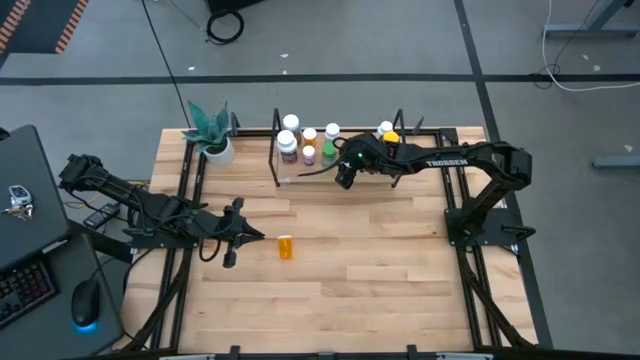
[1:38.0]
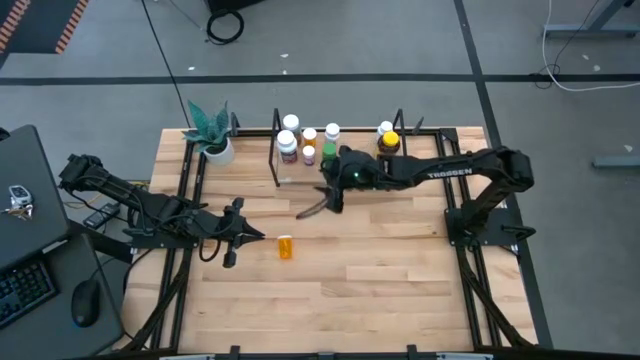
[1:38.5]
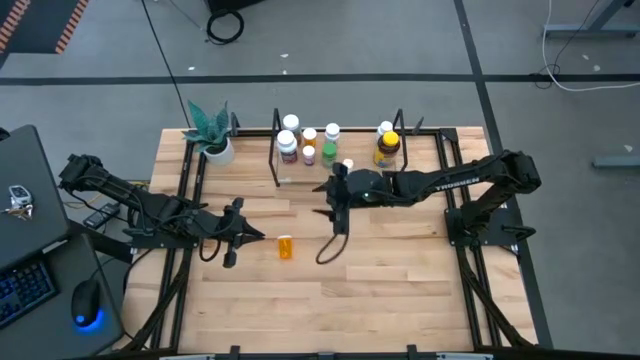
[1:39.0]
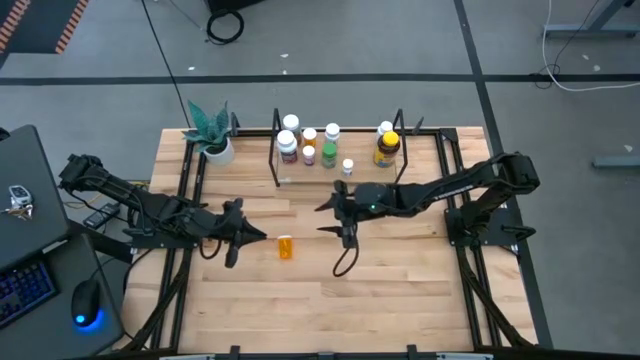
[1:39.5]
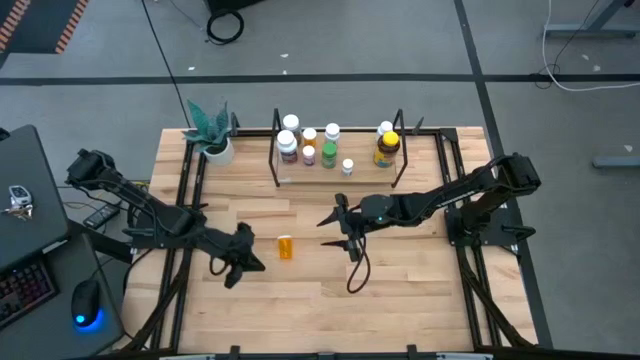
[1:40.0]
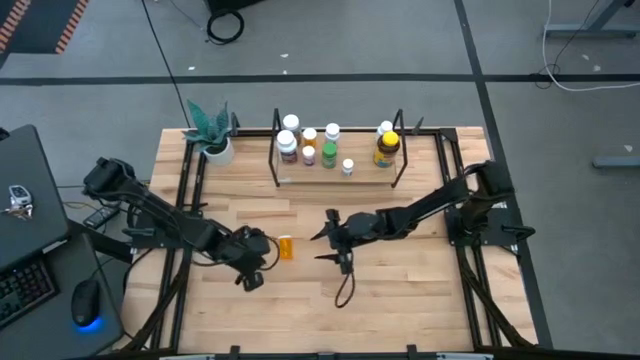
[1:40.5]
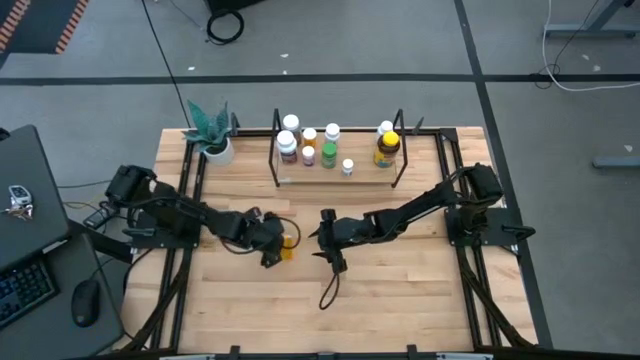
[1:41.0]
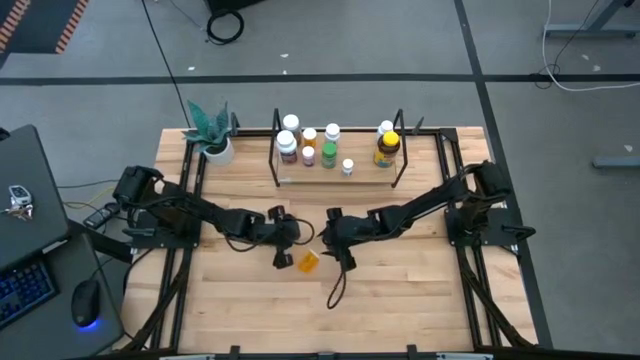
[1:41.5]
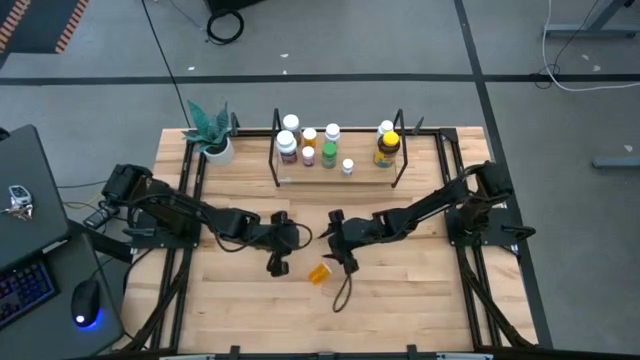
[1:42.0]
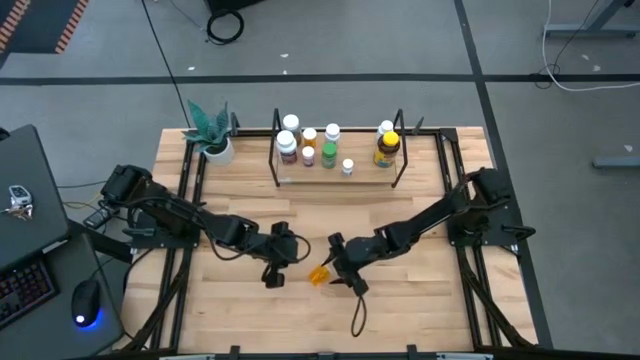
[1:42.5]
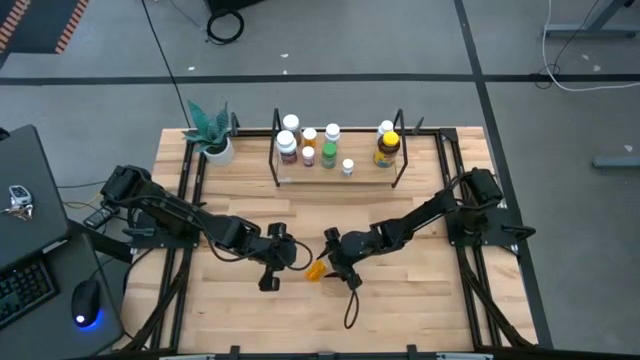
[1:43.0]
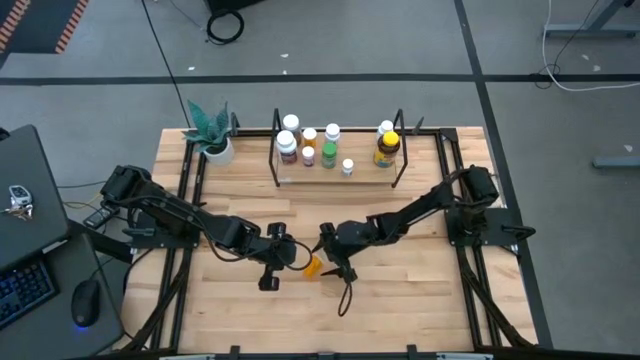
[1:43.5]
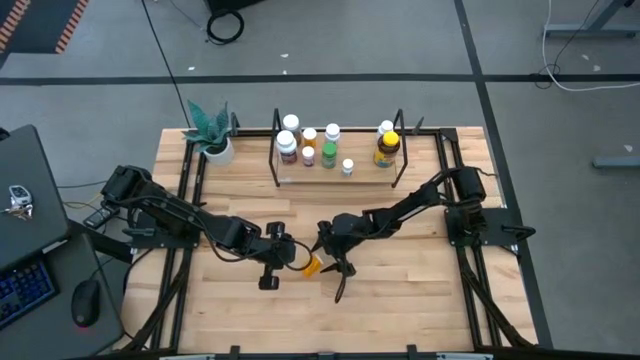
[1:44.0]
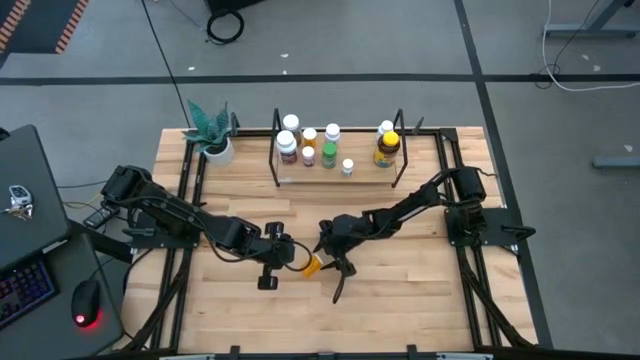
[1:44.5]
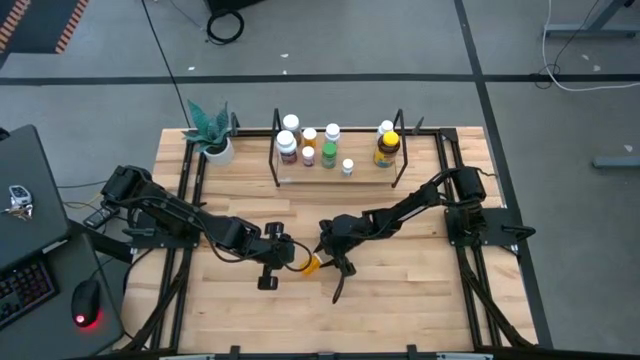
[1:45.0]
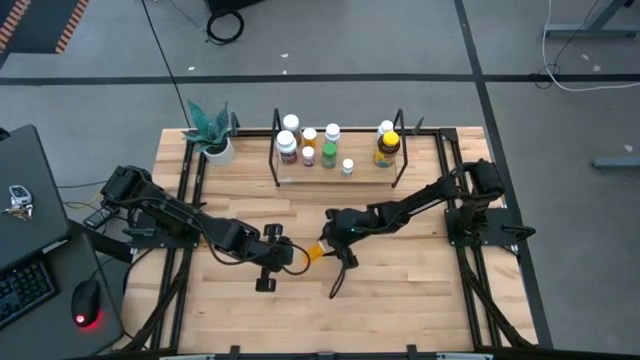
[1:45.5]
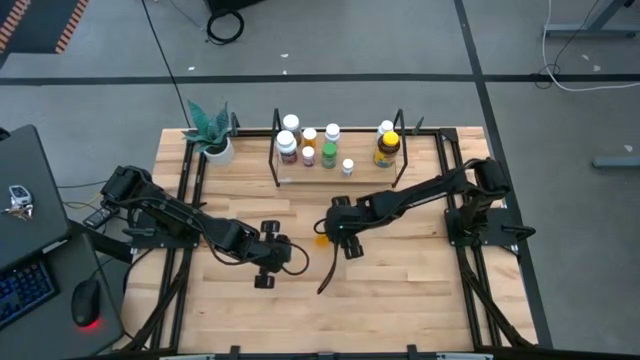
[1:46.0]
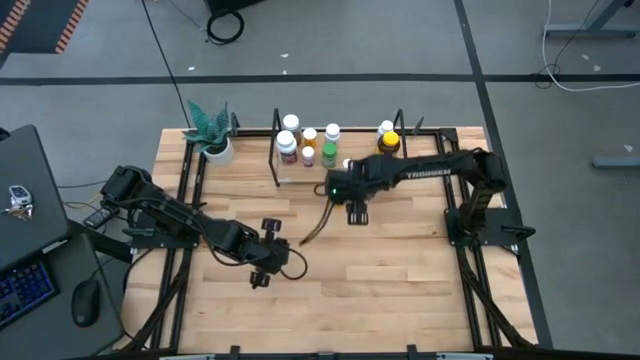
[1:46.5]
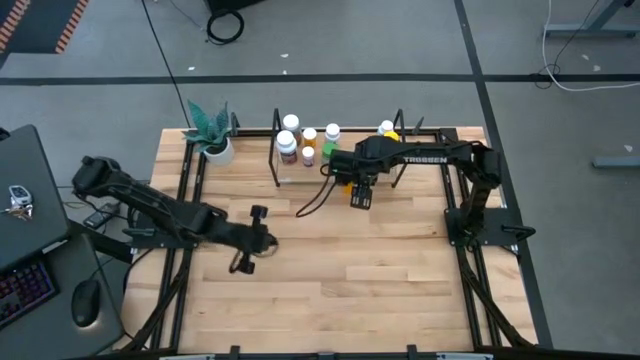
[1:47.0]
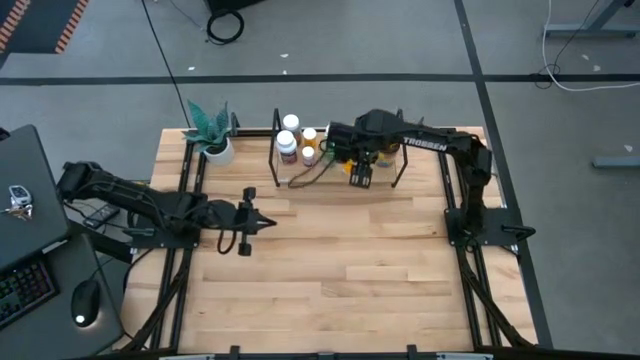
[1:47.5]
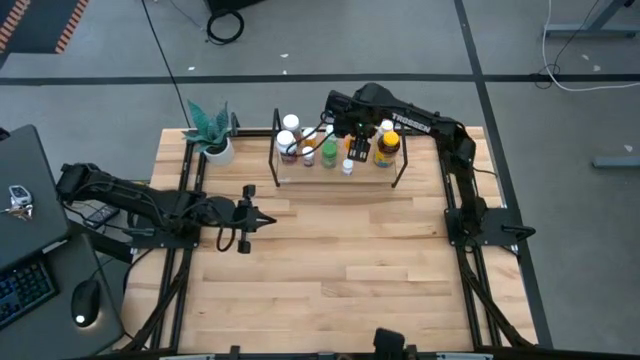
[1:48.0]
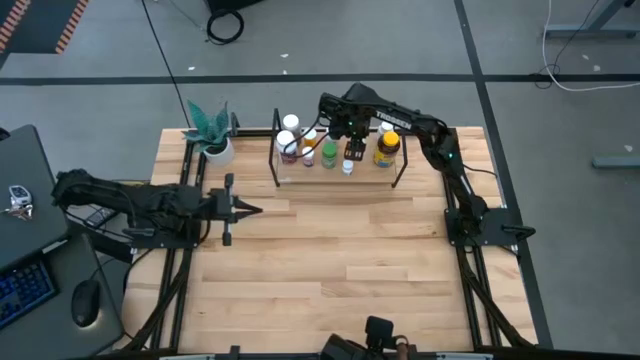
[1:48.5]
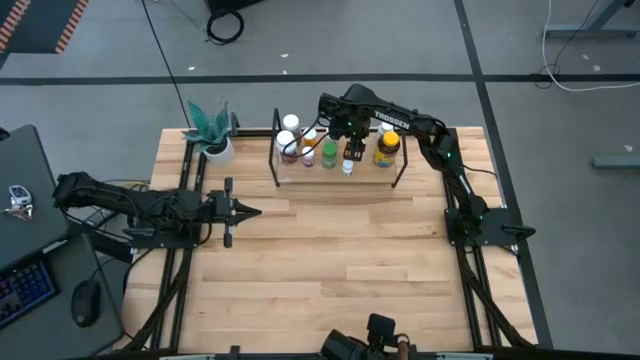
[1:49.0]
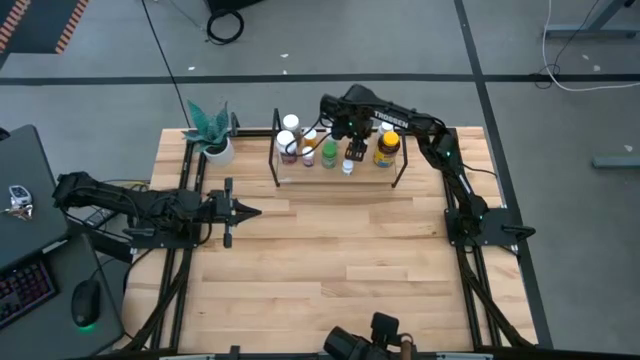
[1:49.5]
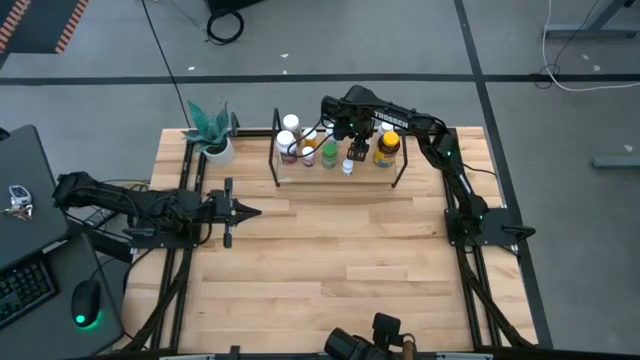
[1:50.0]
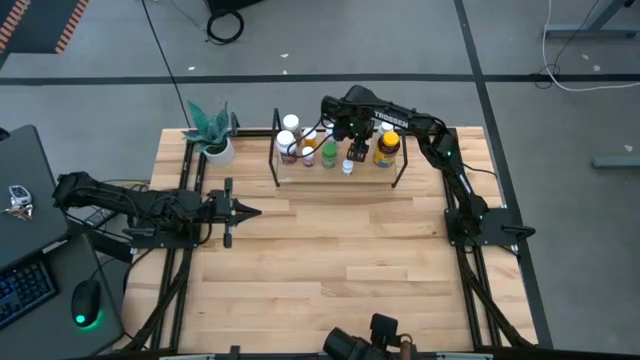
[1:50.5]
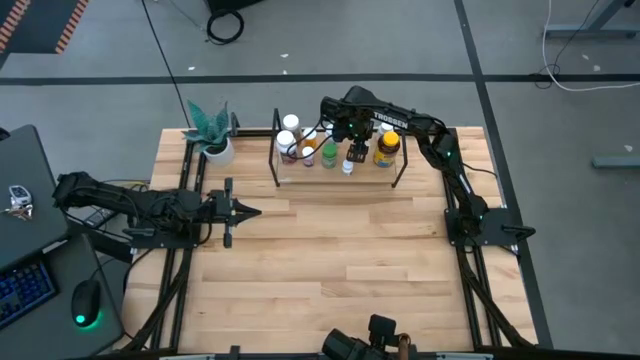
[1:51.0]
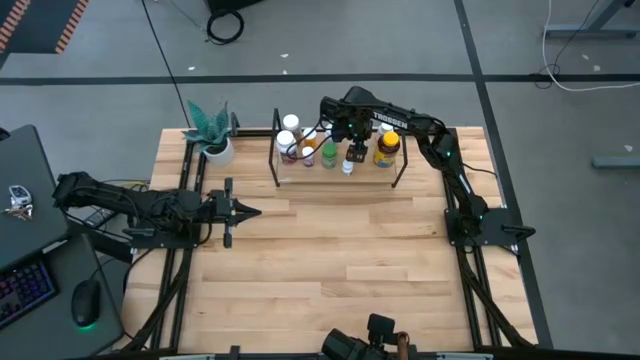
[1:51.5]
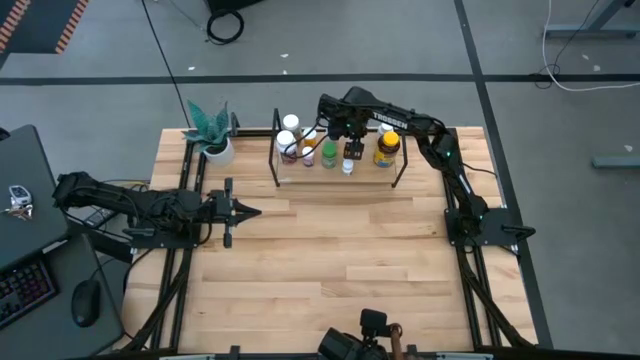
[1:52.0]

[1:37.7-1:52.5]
Task: Pick and place medicine bottles onto shelf by color
Put the orange pill bottle on the shelf

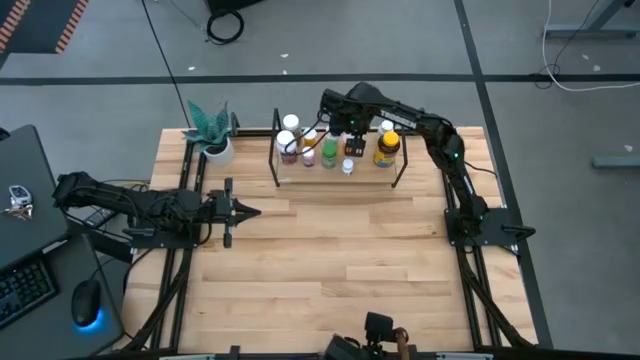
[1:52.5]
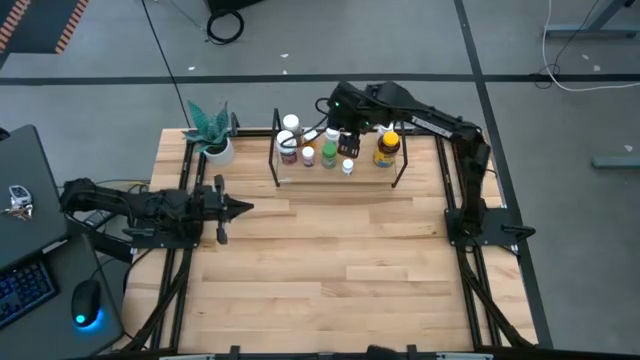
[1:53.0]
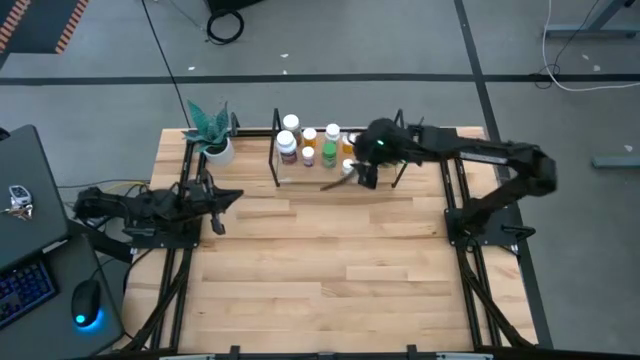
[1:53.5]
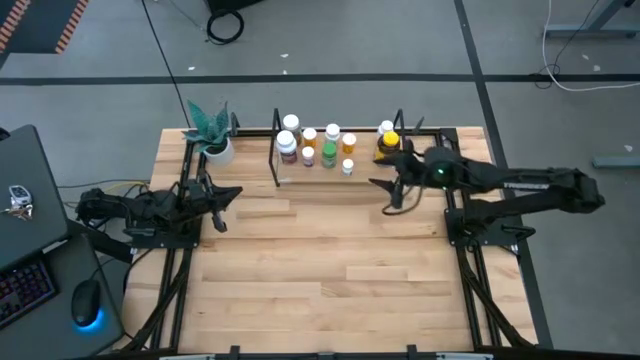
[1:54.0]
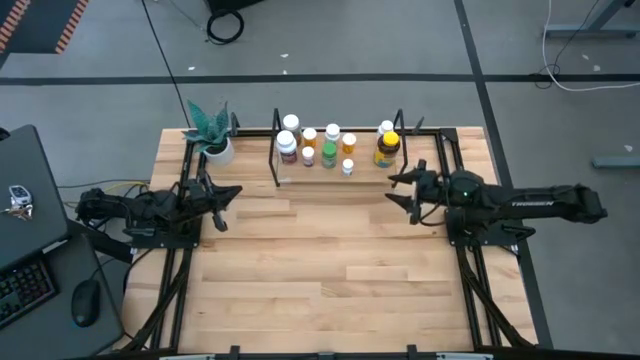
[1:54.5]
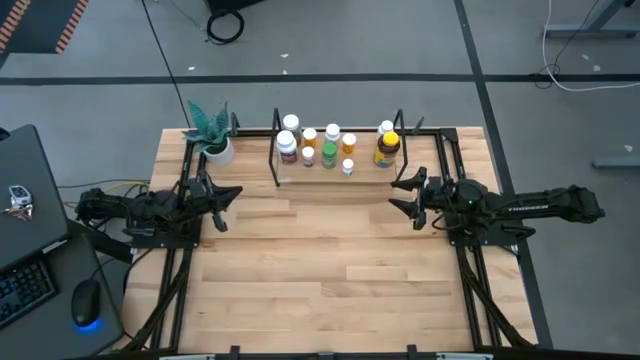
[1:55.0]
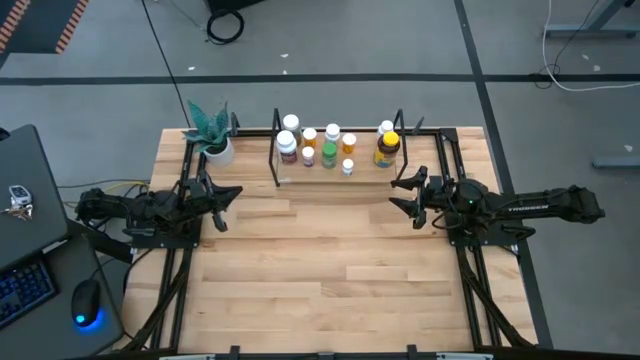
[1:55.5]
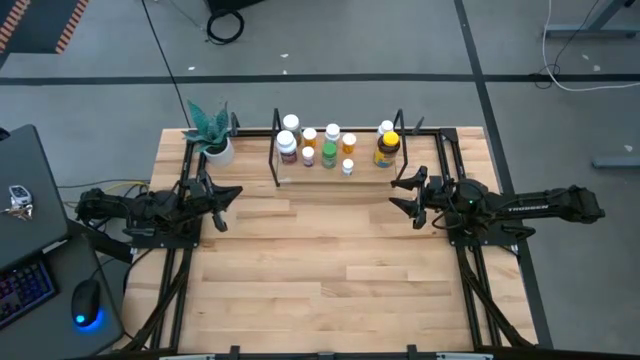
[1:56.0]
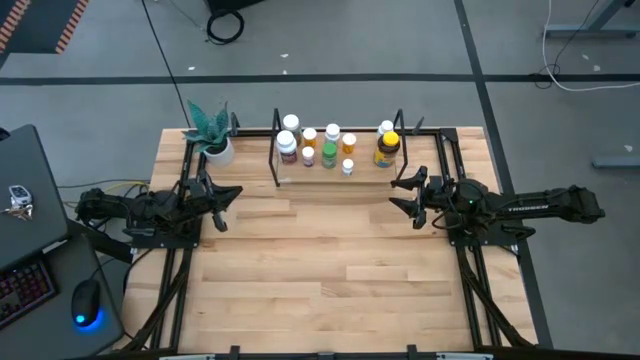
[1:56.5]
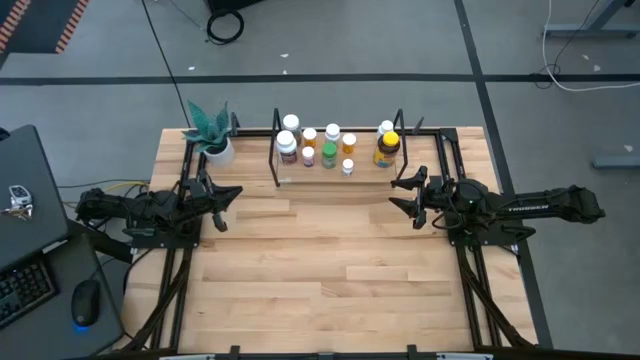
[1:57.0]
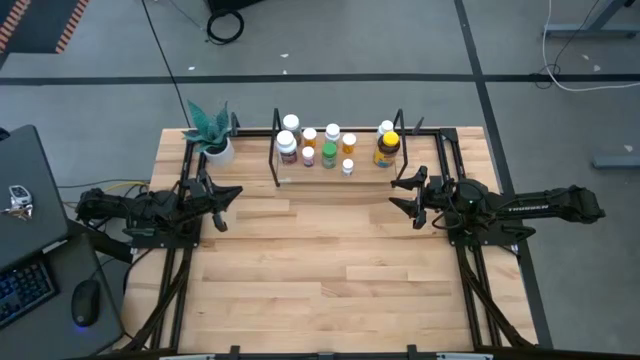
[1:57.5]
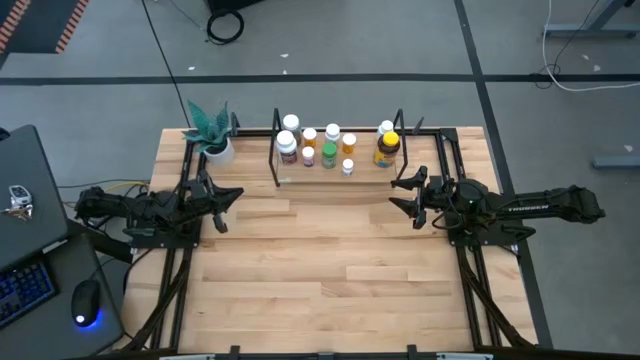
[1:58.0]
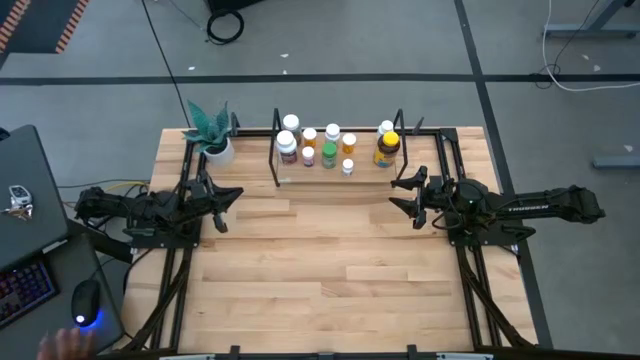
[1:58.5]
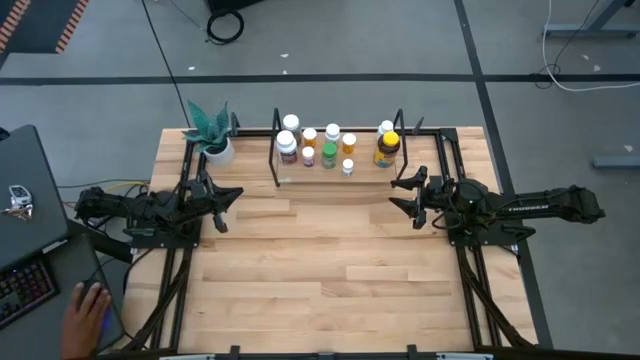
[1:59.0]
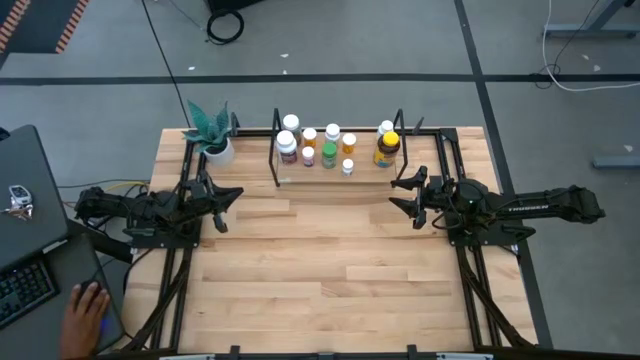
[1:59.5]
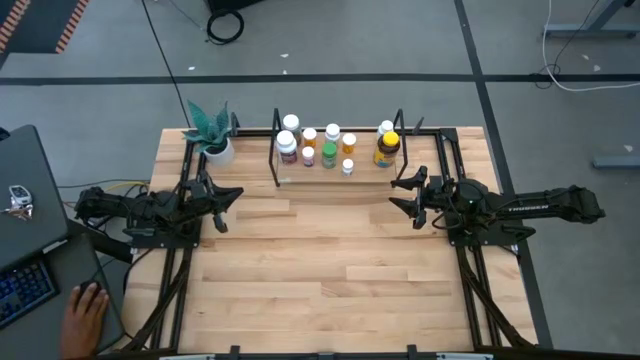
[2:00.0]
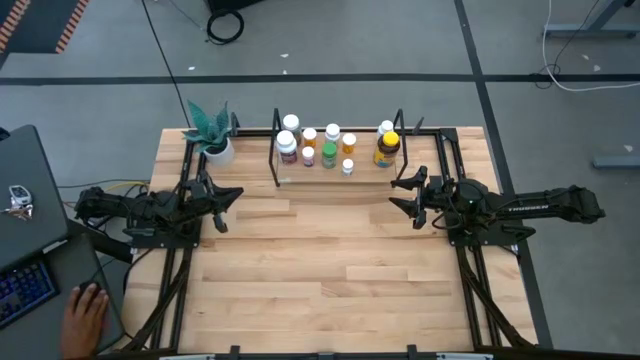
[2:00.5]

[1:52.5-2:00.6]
Return to Home Position
